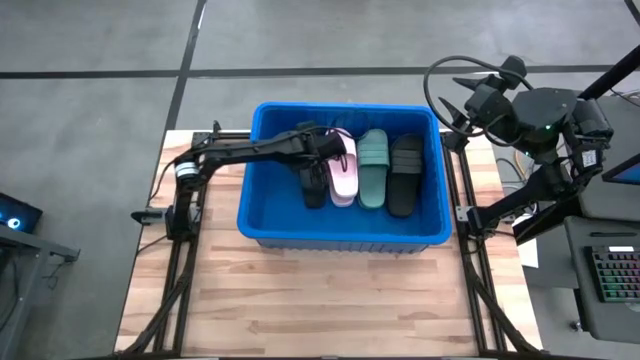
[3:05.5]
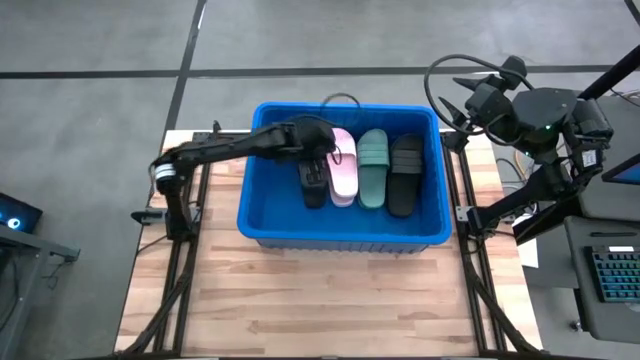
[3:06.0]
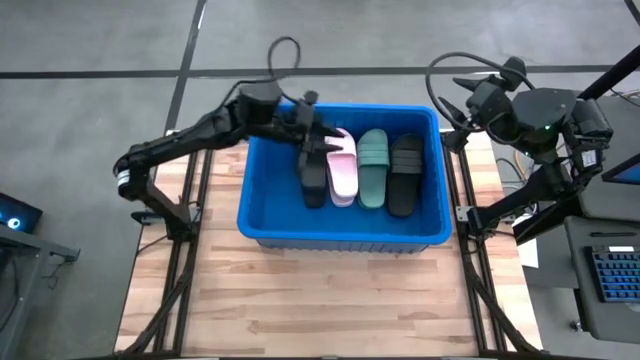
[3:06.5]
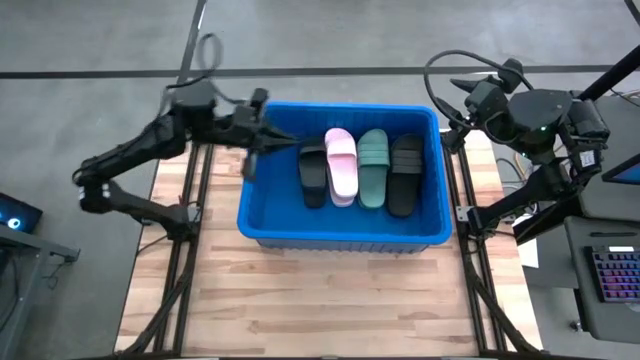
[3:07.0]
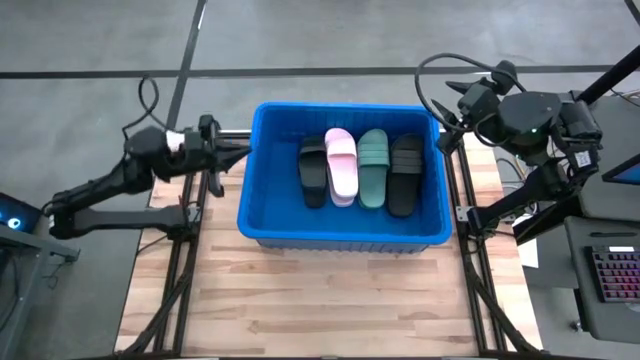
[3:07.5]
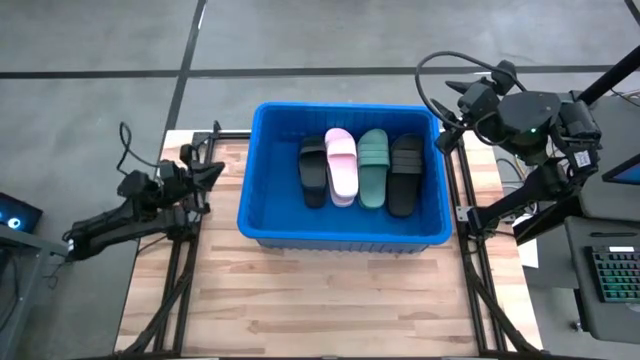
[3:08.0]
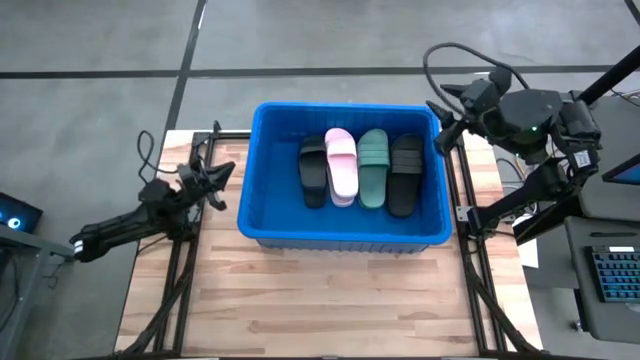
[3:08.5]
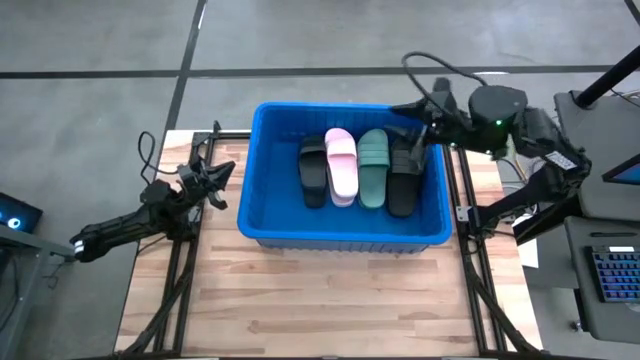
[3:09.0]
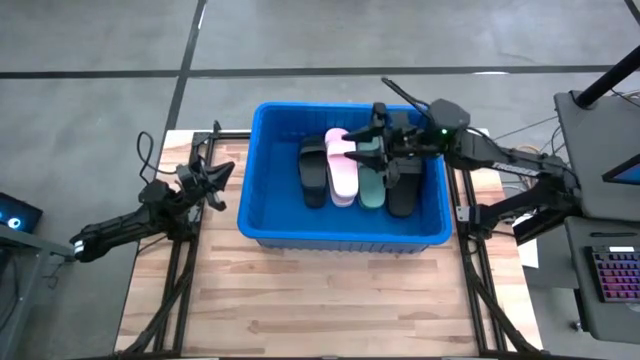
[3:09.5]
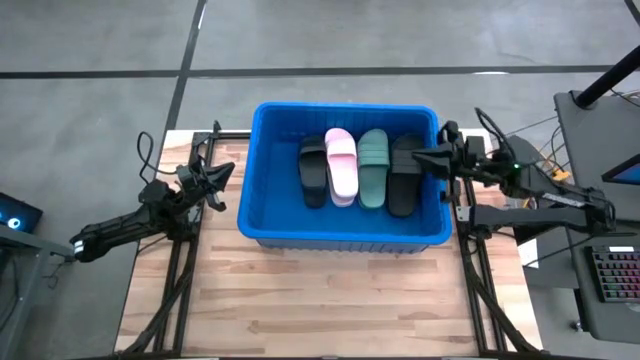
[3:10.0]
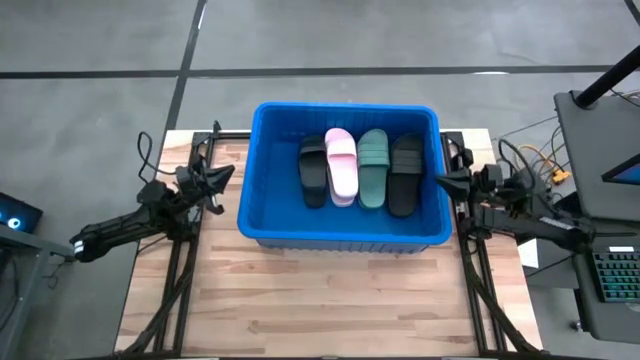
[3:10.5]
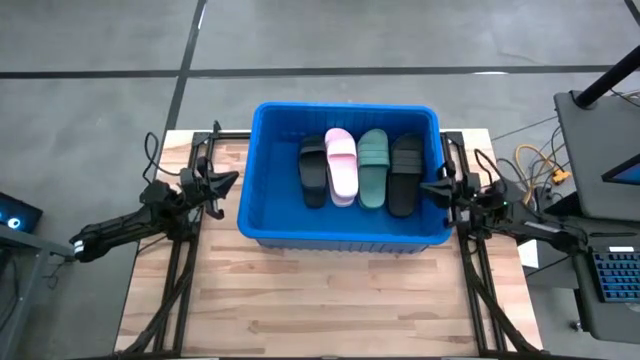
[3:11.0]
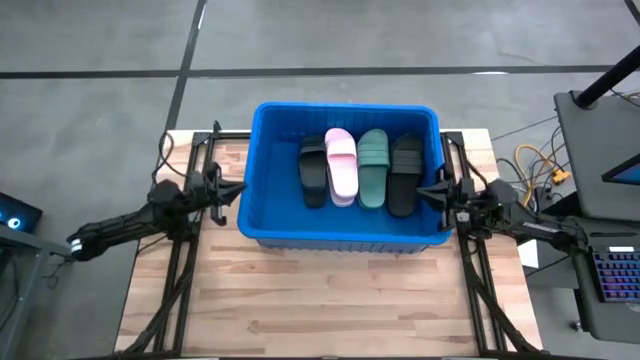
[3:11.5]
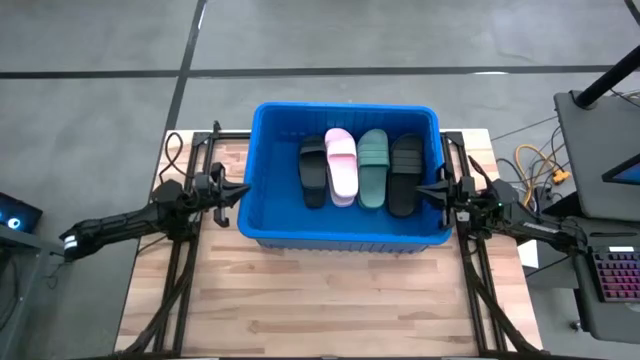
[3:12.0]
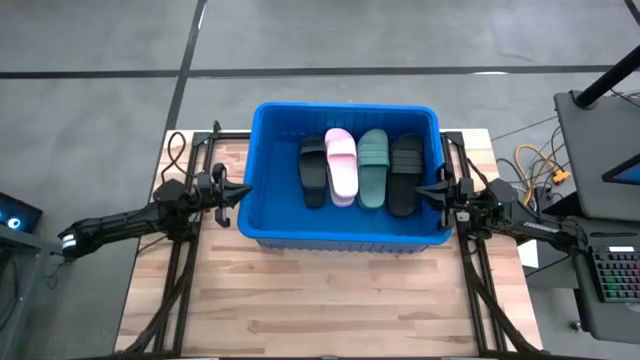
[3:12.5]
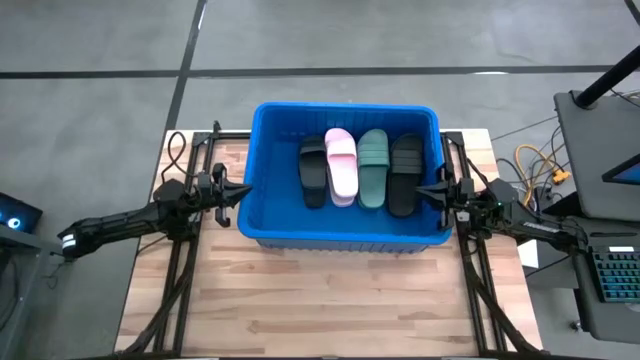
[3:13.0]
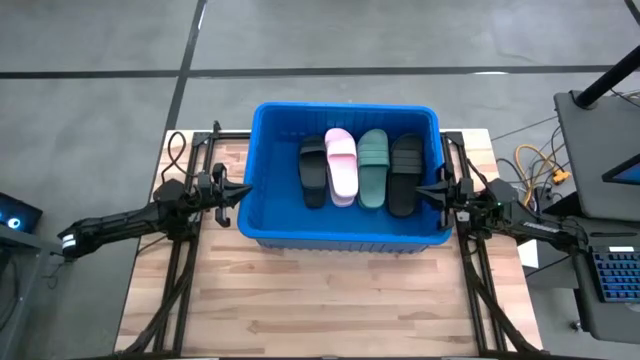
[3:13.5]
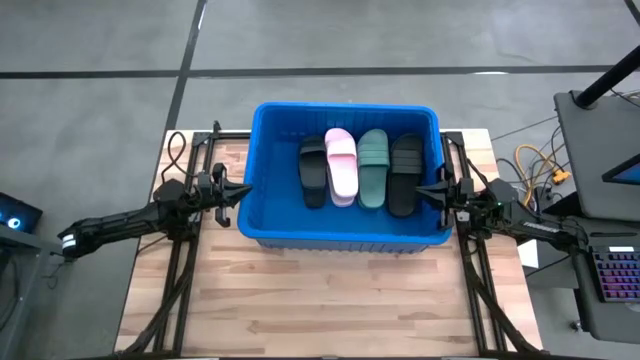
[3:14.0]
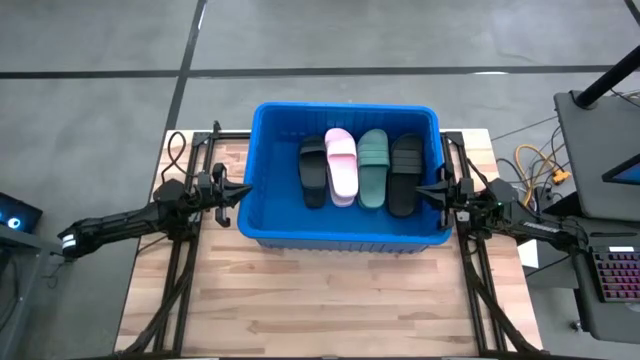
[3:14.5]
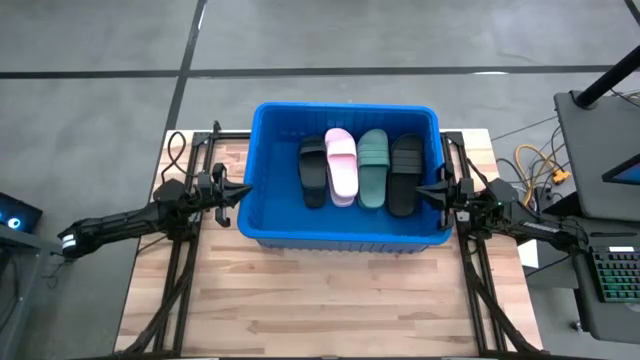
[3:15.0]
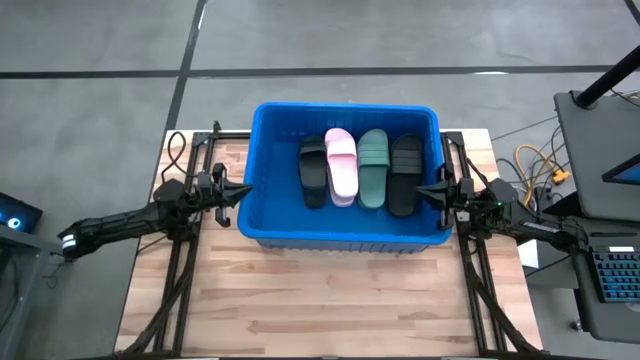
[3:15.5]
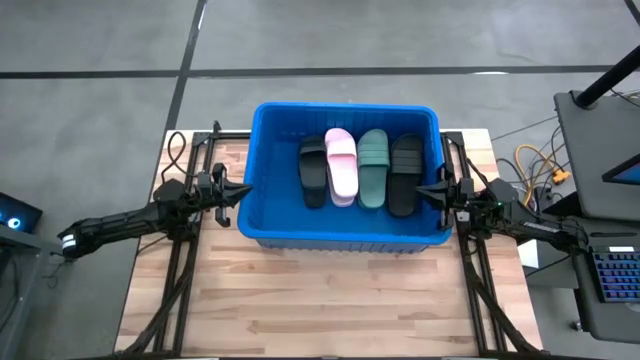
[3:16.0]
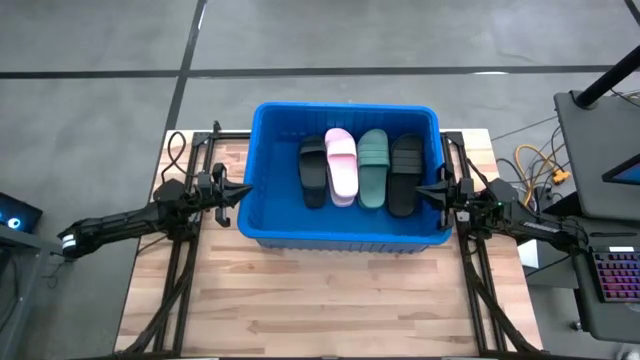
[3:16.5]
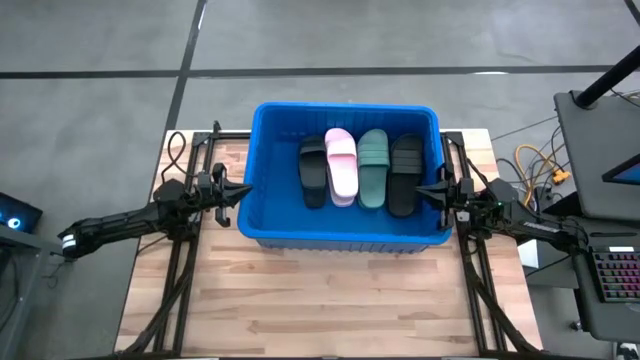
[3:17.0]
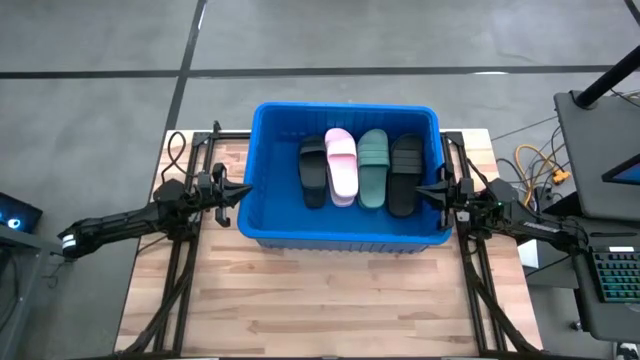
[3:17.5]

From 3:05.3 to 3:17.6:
Task: Pick and place slides into bin
Return to Home Position

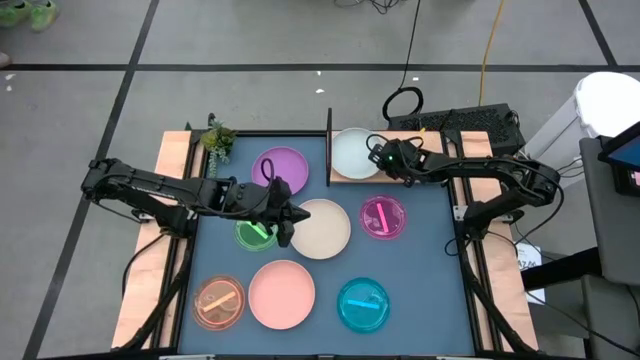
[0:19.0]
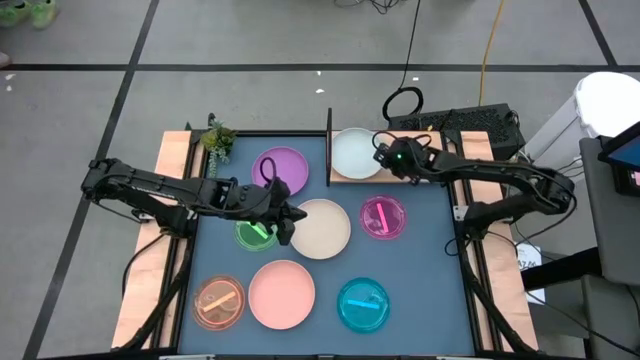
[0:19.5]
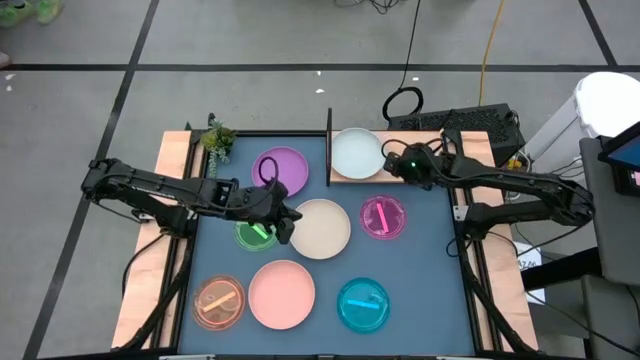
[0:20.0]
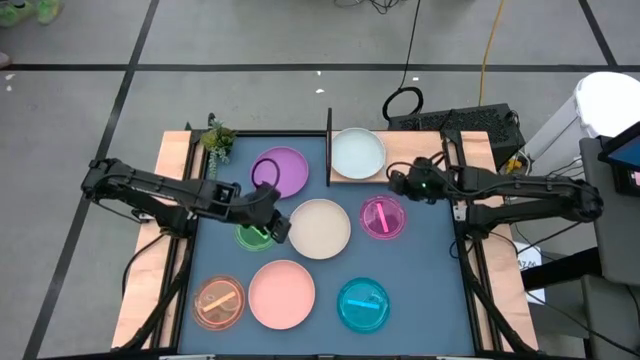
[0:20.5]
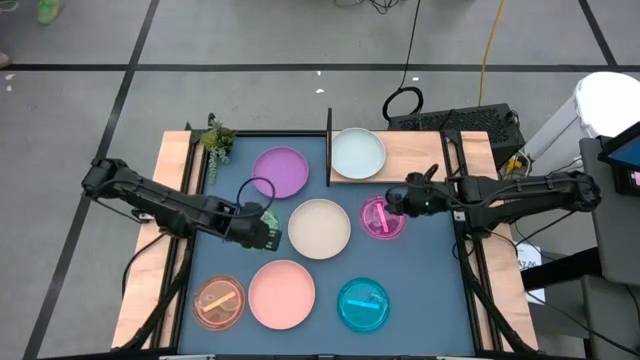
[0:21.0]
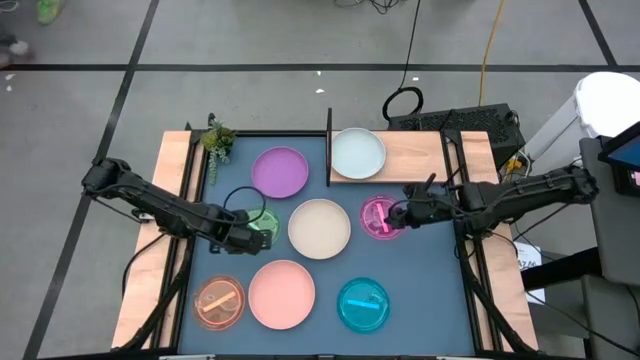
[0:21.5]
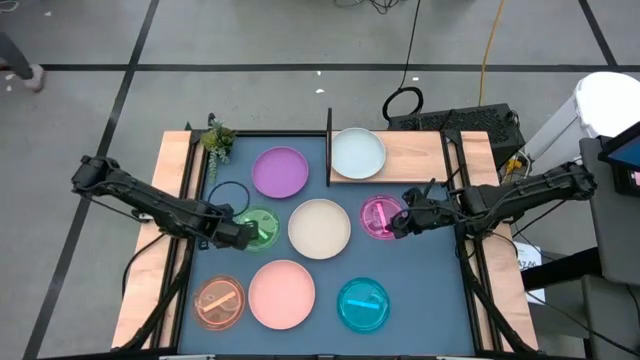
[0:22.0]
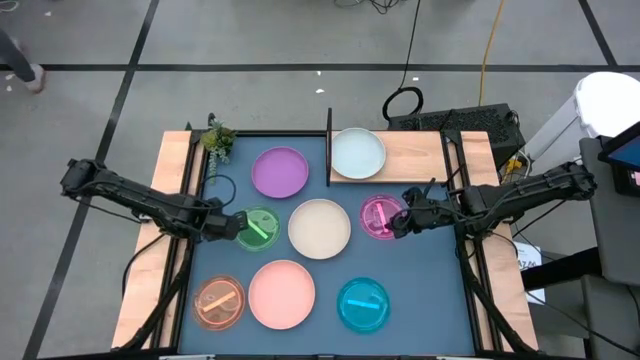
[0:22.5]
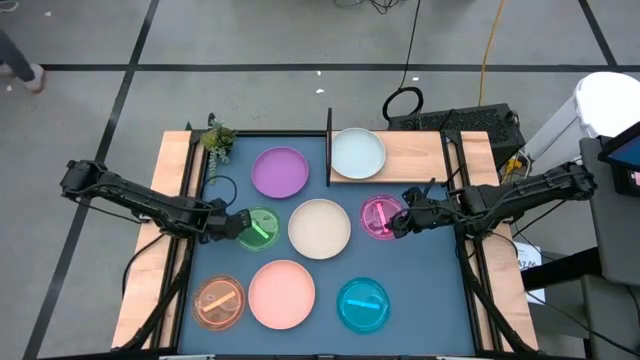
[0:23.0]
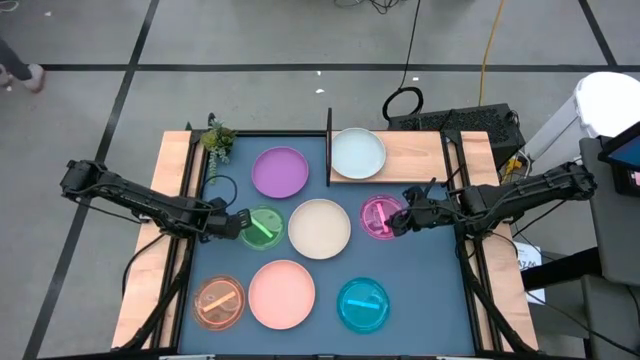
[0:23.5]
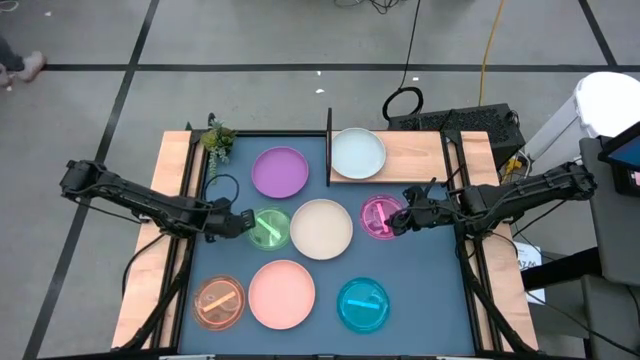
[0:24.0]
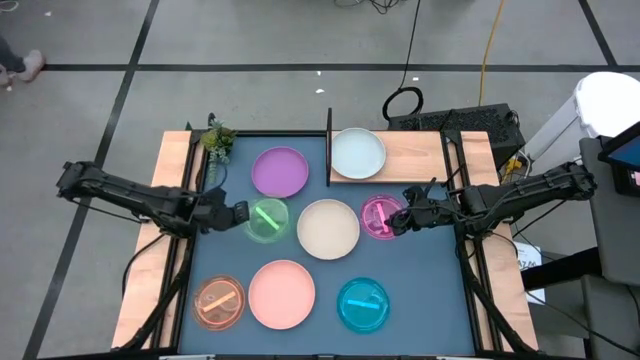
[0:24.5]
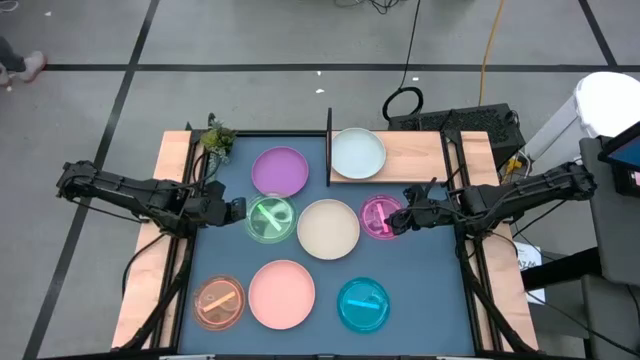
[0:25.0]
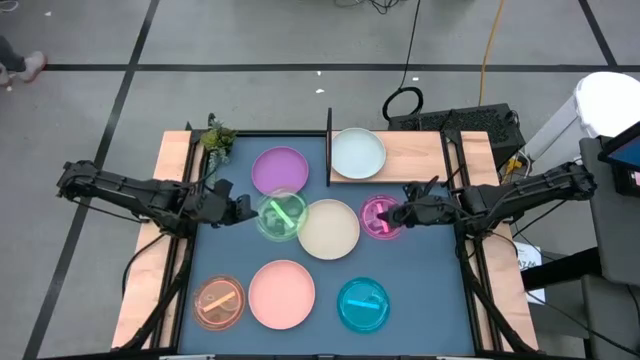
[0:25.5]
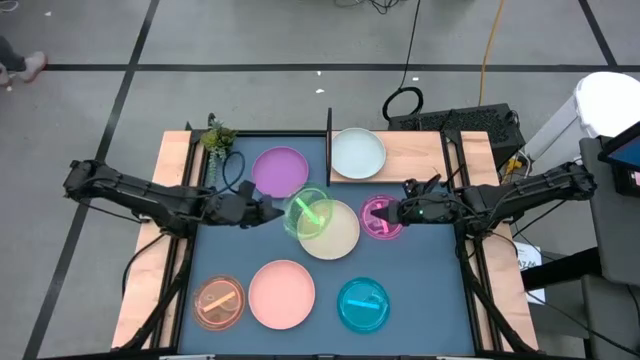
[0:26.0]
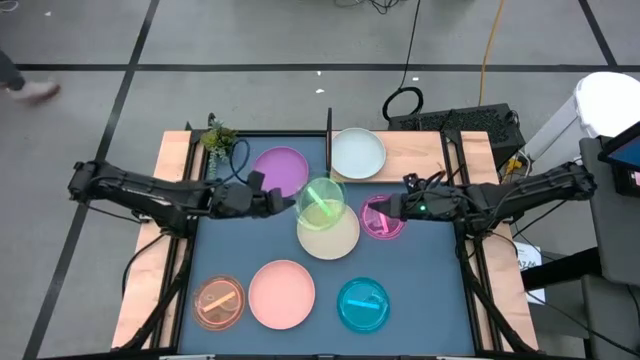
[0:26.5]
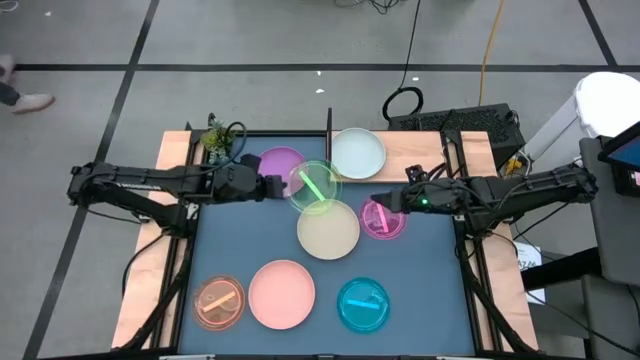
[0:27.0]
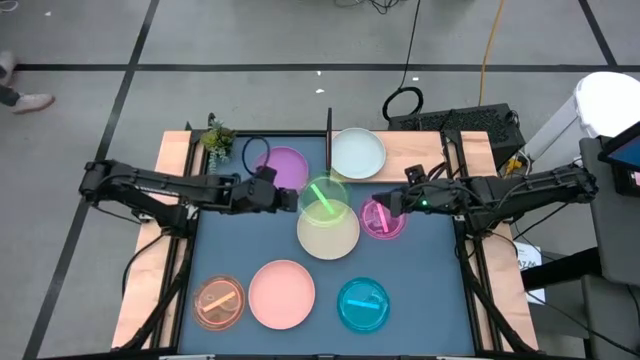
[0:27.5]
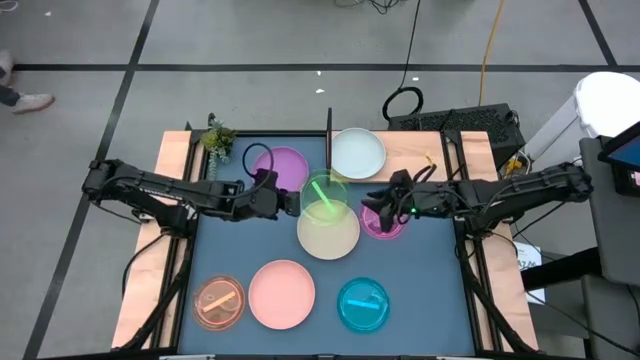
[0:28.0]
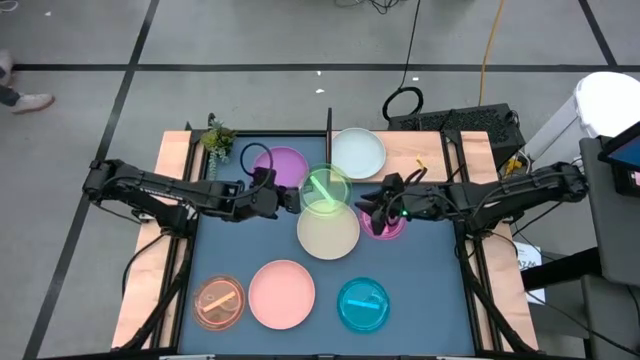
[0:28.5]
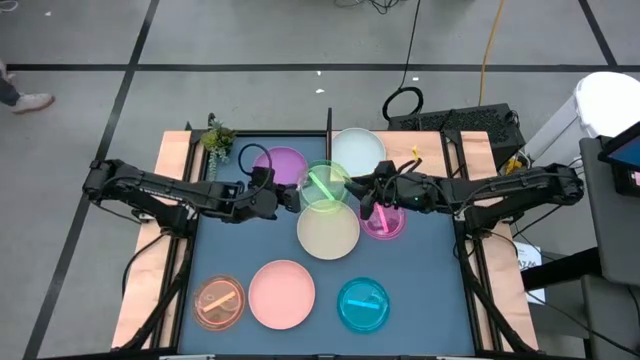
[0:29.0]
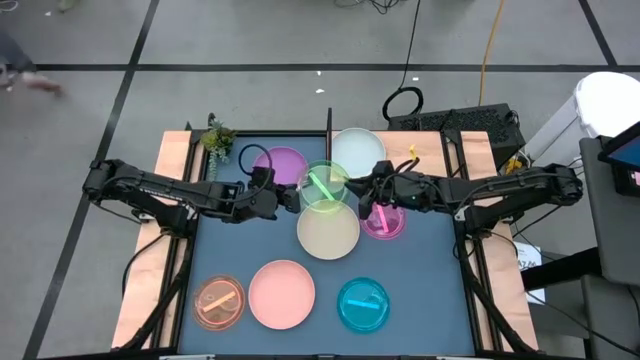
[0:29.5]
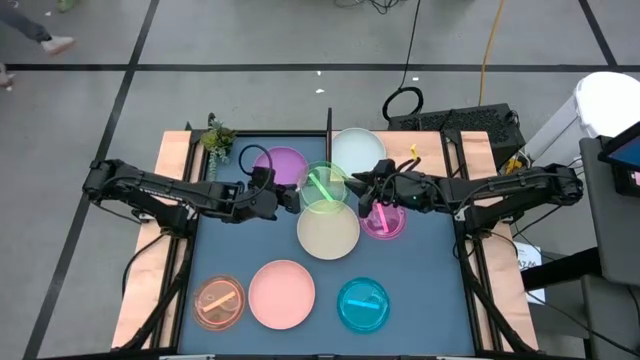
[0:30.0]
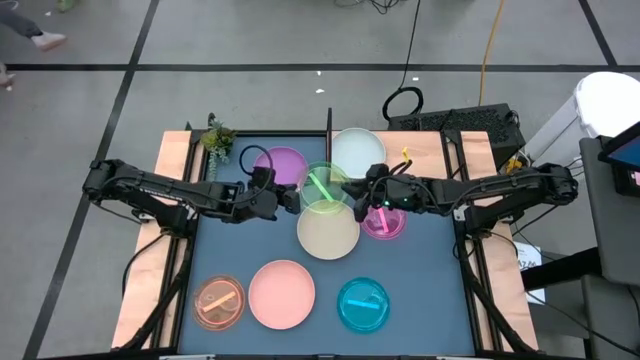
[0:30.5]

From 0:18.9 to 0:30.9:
Task: Place and stack plates onto a shelf
Put the green plate on the shelf
